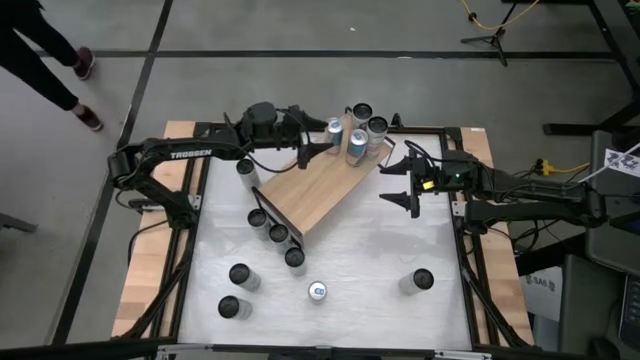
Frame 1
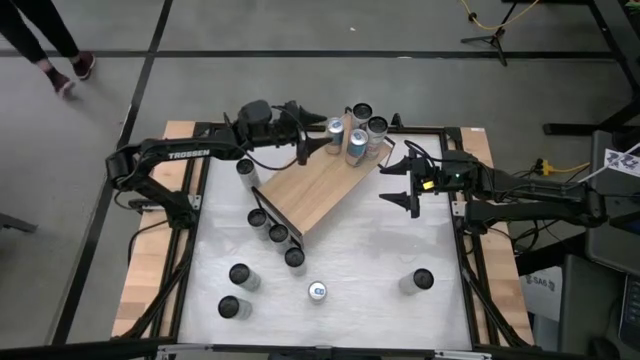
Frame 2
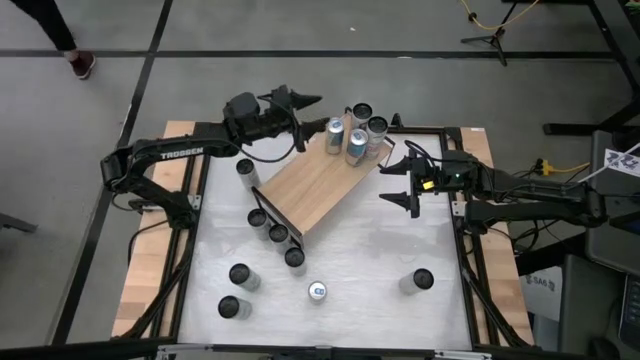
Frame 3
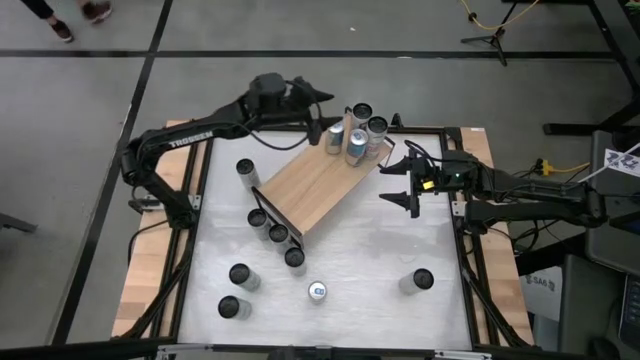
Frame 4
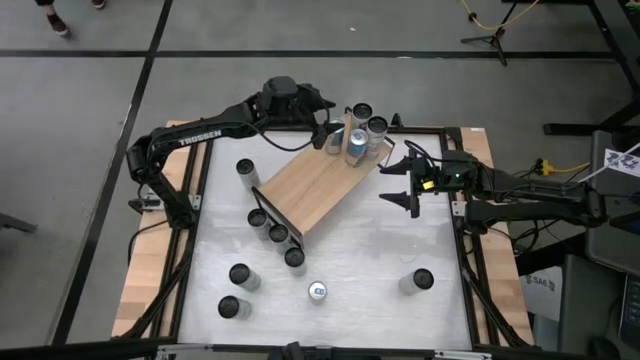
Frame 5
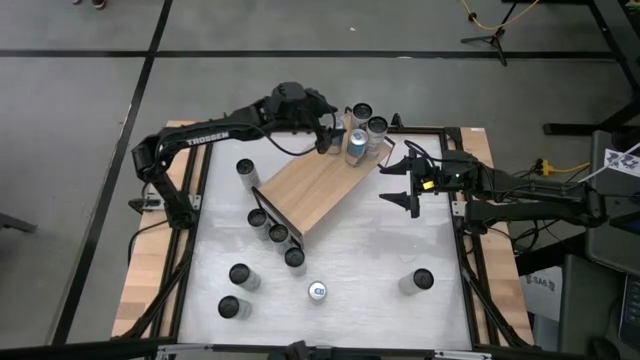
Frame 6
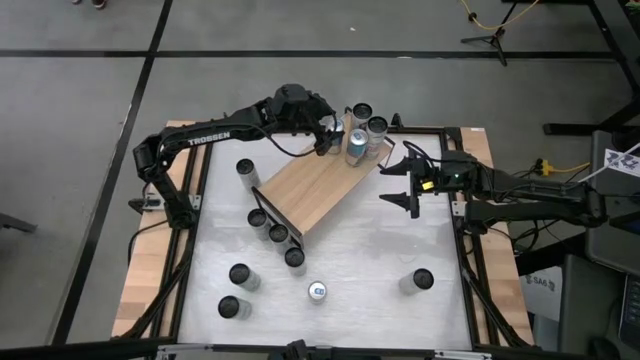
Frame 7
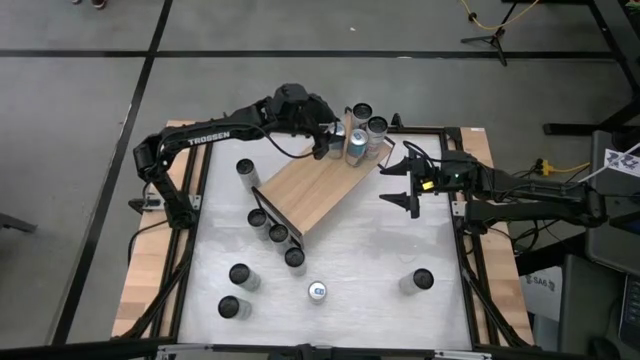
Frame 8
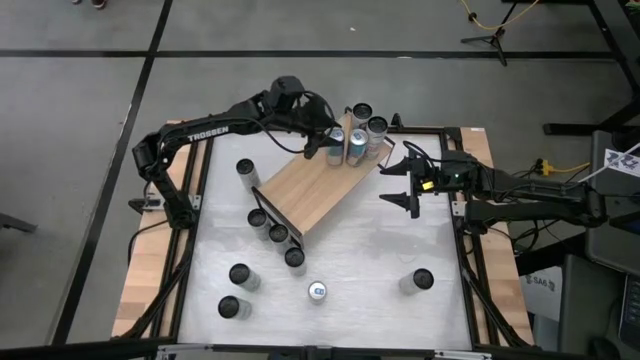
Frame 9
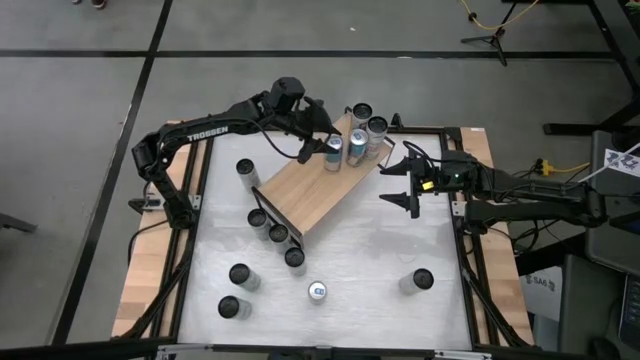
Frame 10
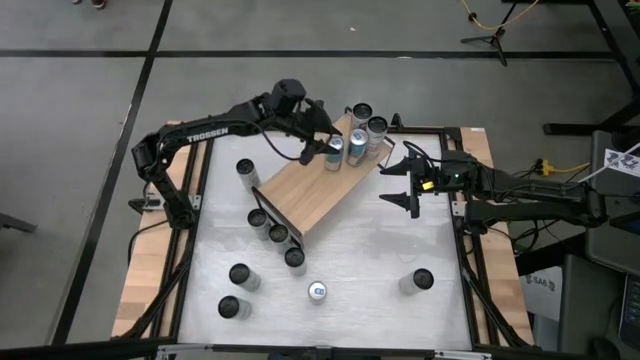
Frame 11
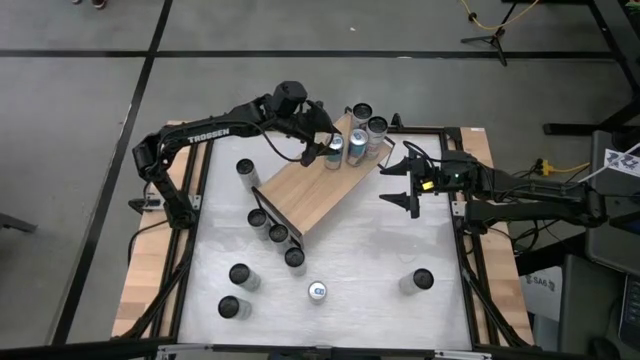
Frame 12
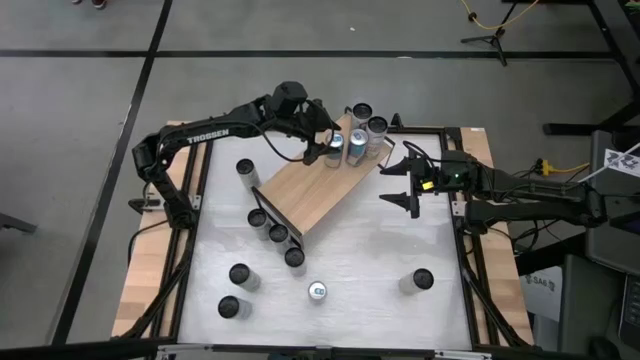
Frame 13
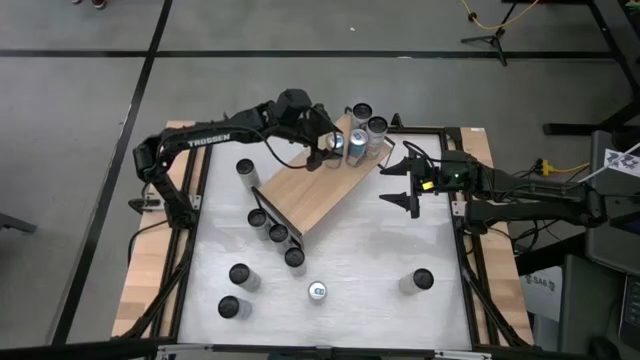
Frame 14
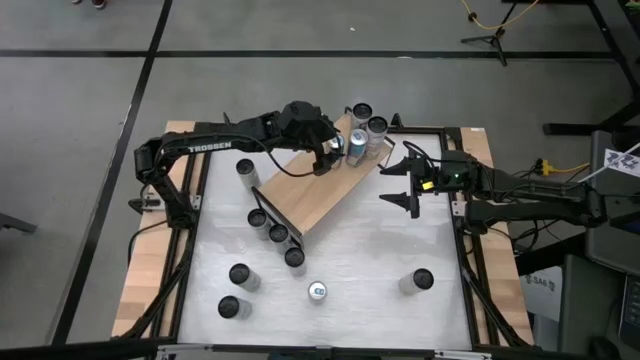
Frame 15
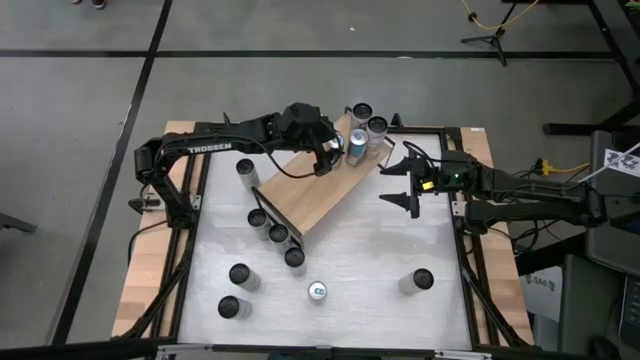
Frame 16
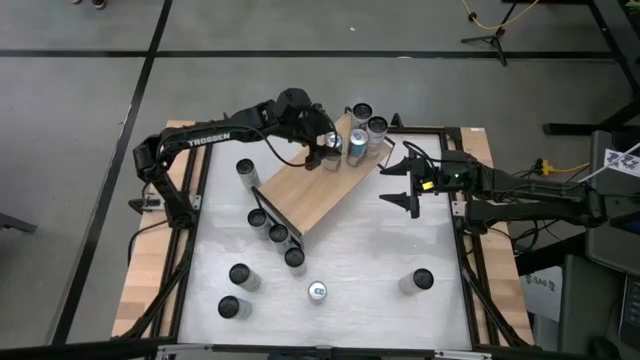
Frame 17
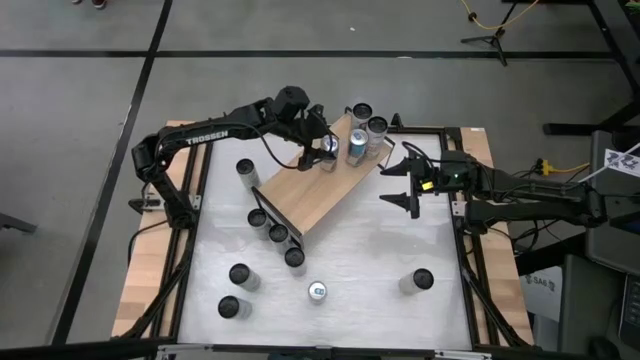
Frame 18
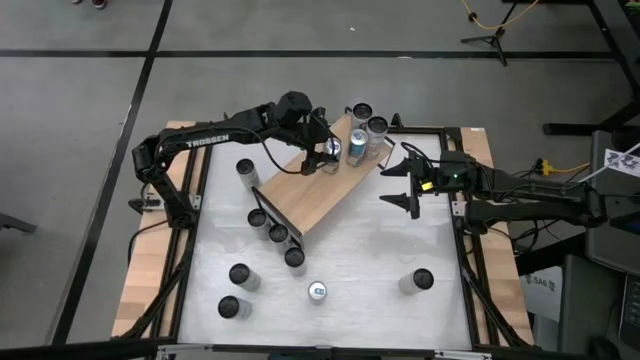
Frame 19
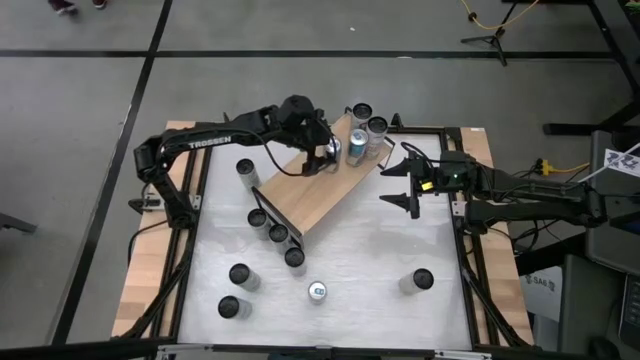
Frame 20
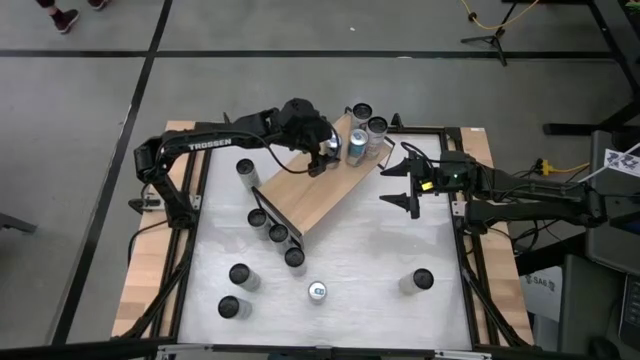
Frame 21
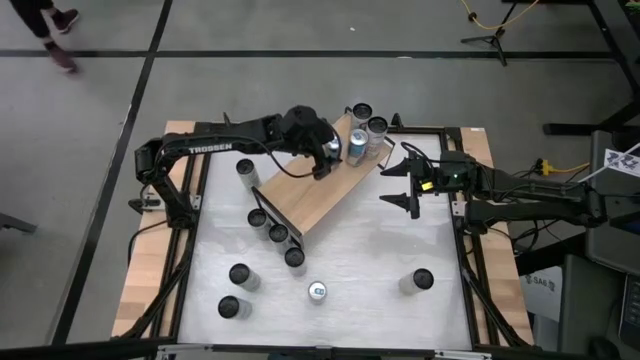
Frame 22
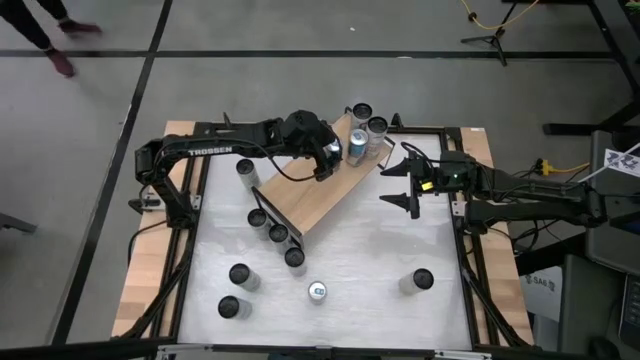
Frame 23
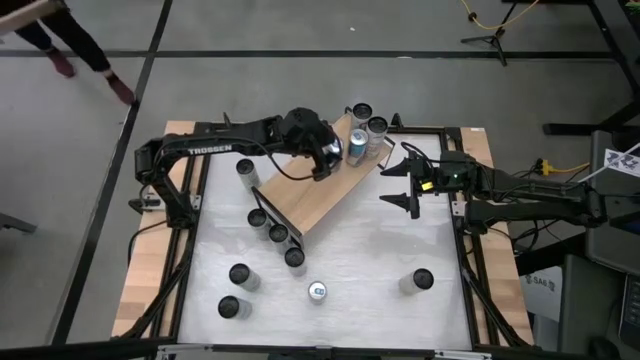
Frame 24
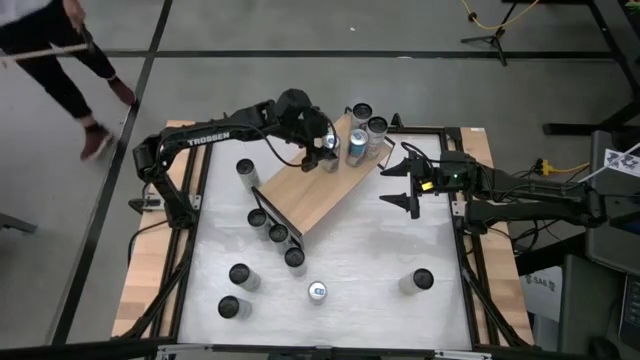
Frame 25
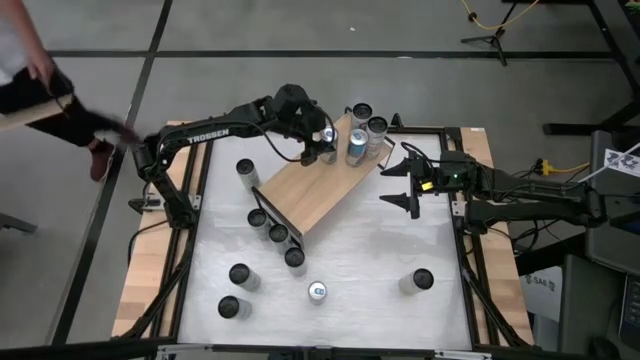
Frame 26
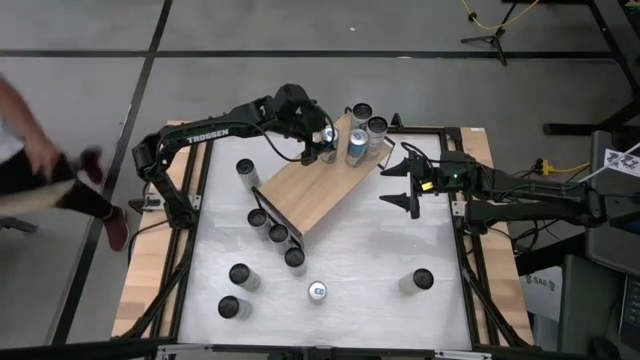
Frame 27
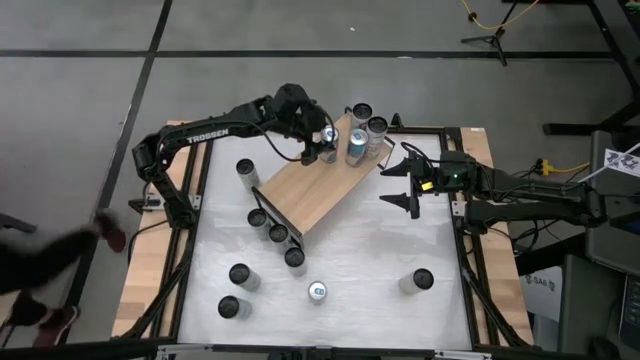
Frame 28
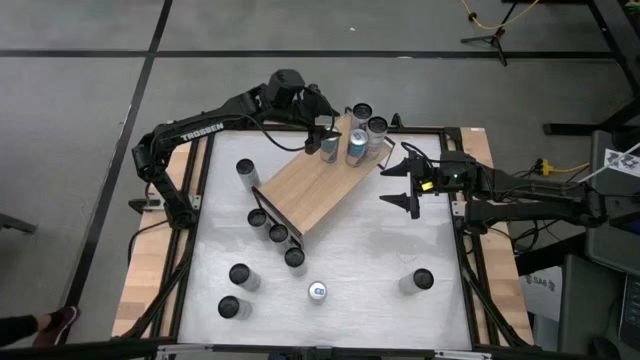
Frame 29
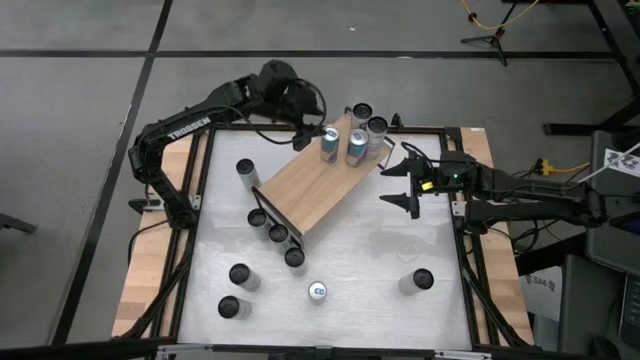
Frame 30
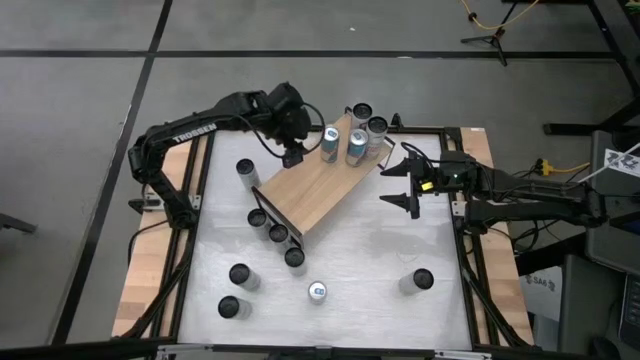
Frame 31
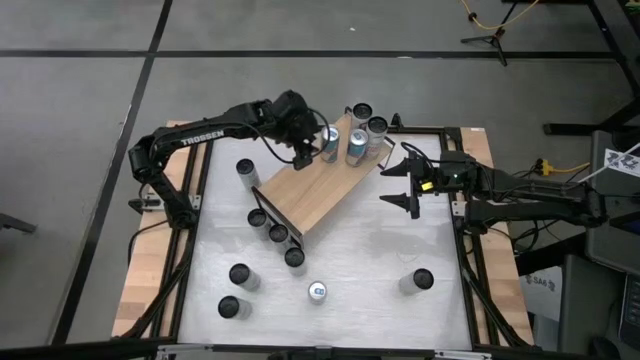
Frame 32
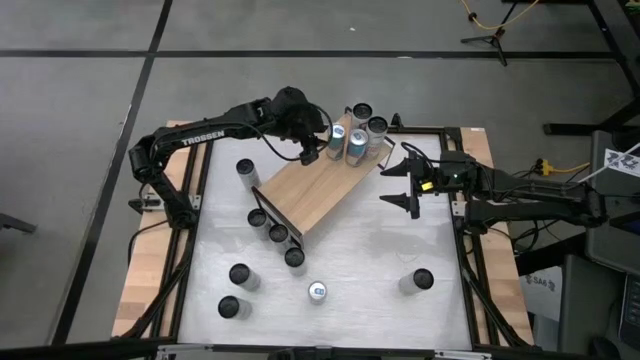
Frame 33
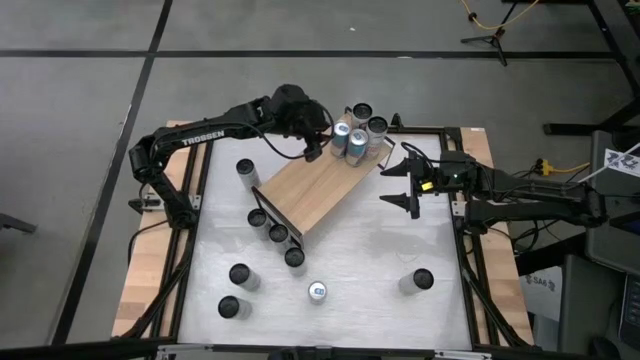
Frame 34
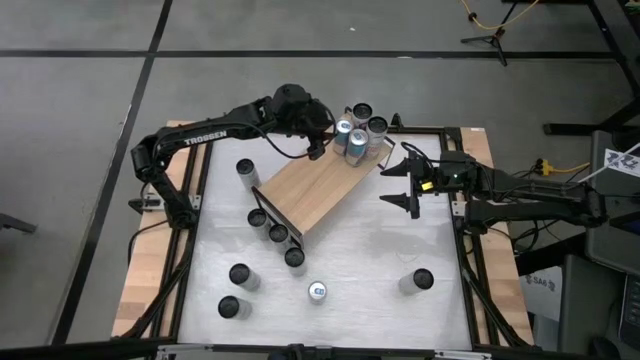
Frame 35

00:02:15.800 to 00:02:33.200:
Task: Place canned beverage on shelf
Put the blue soda can on the shelf aligned with the other blue soda can
